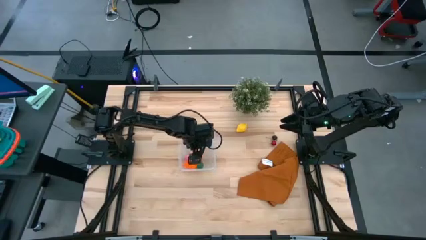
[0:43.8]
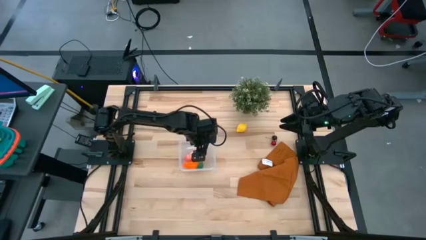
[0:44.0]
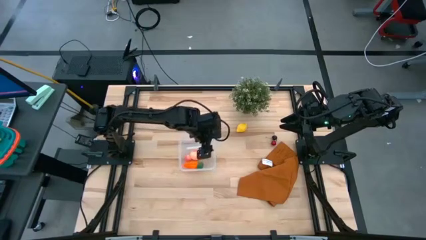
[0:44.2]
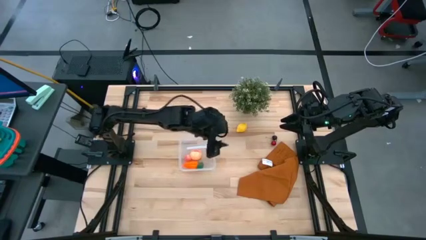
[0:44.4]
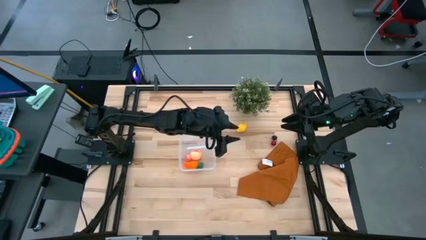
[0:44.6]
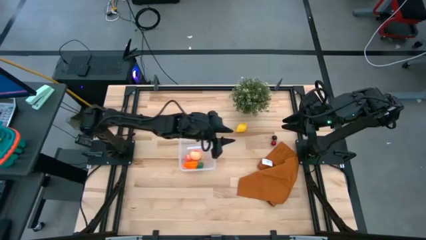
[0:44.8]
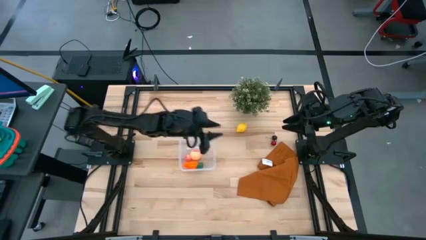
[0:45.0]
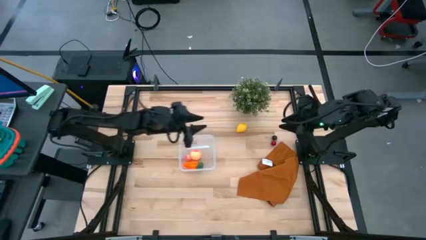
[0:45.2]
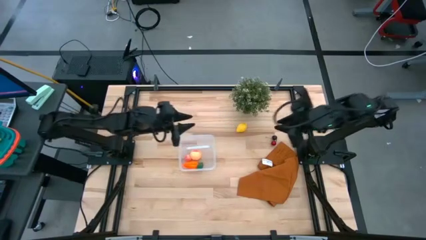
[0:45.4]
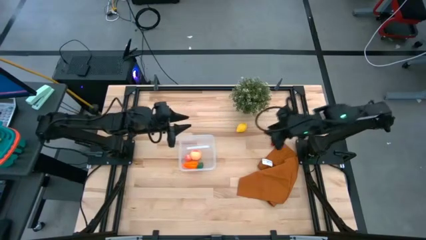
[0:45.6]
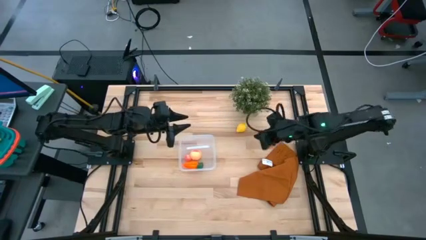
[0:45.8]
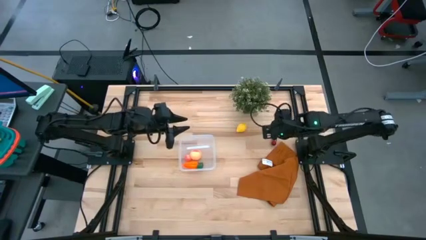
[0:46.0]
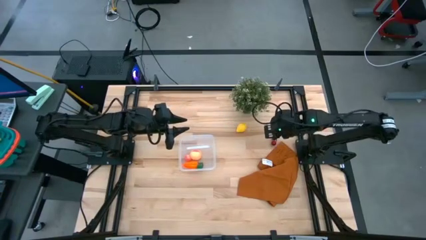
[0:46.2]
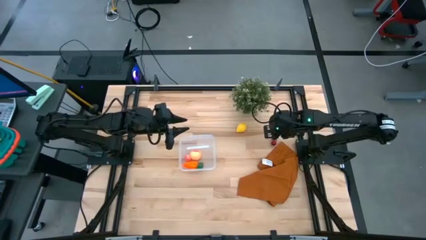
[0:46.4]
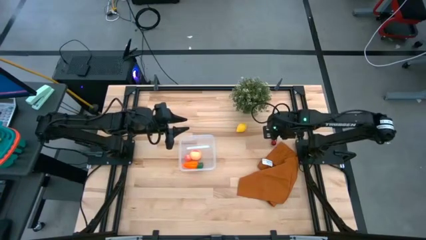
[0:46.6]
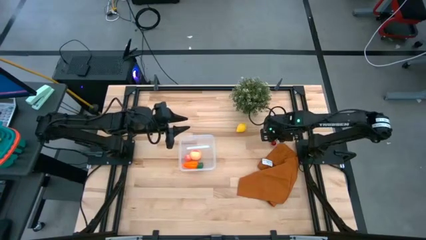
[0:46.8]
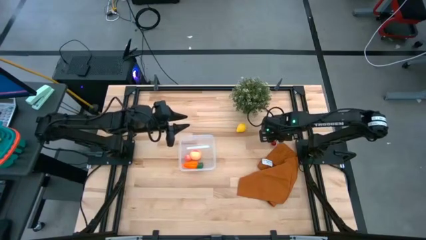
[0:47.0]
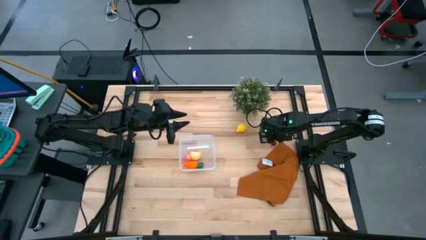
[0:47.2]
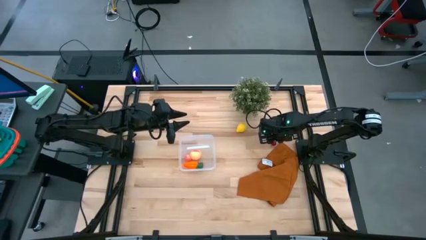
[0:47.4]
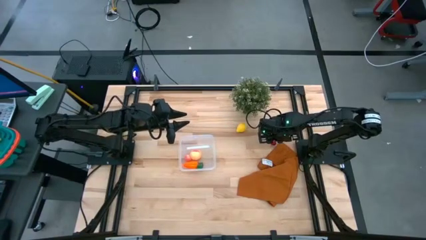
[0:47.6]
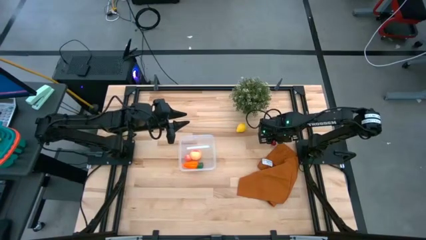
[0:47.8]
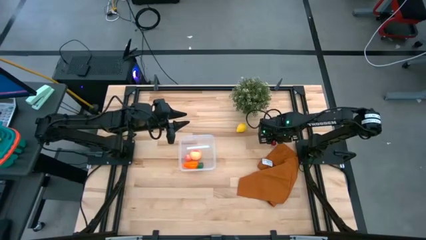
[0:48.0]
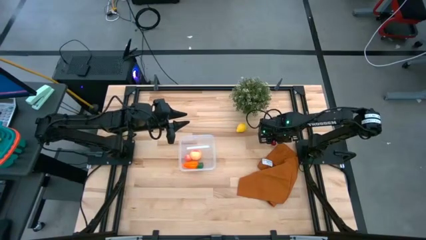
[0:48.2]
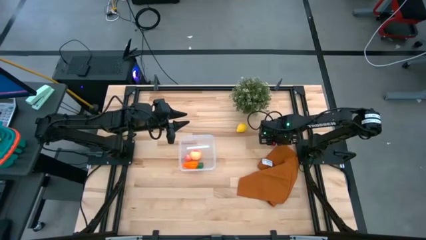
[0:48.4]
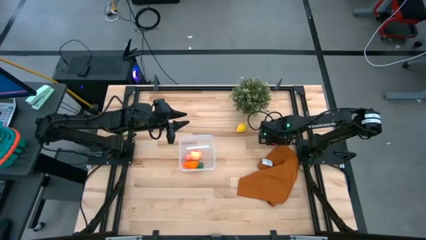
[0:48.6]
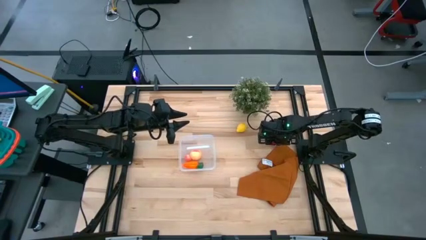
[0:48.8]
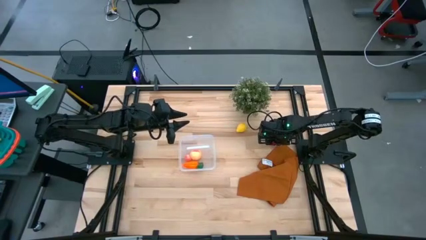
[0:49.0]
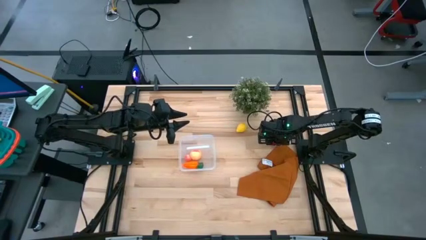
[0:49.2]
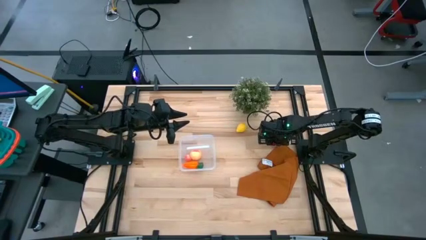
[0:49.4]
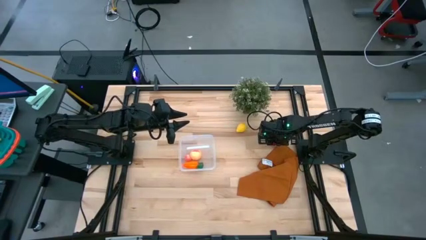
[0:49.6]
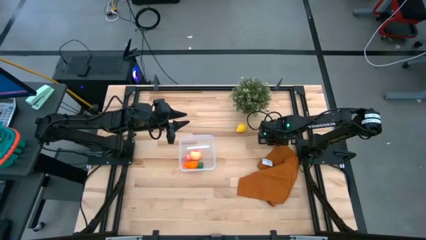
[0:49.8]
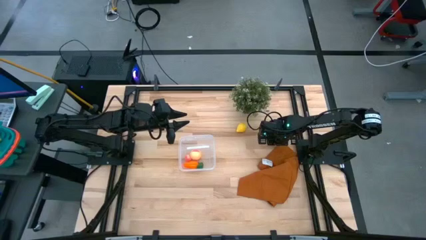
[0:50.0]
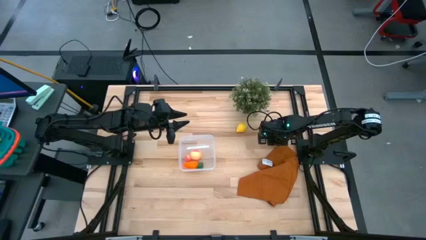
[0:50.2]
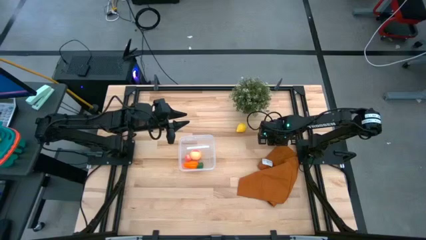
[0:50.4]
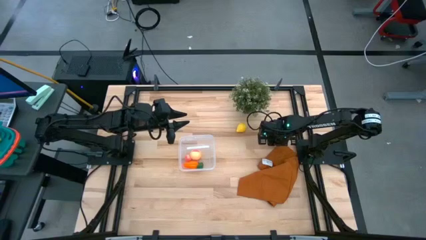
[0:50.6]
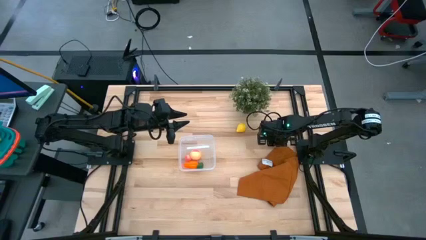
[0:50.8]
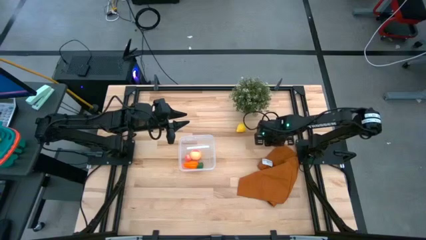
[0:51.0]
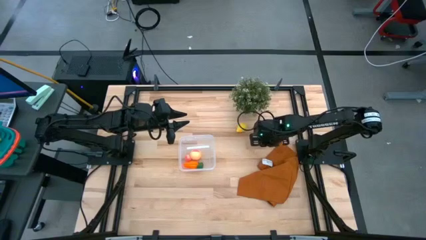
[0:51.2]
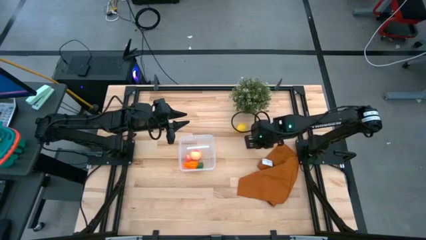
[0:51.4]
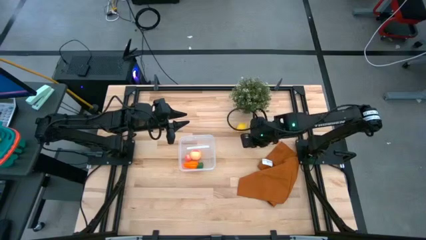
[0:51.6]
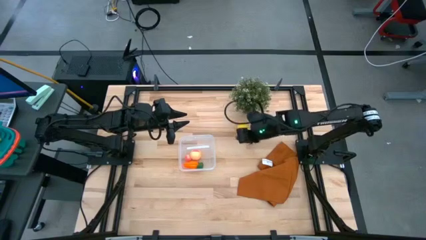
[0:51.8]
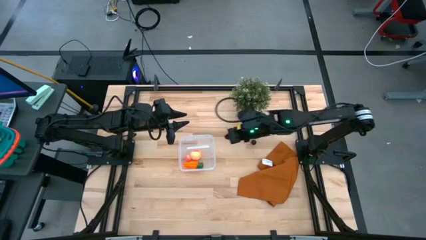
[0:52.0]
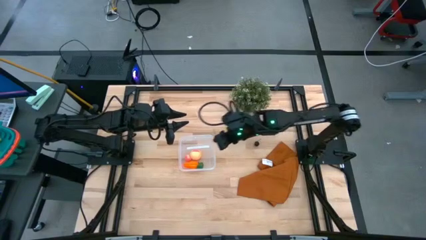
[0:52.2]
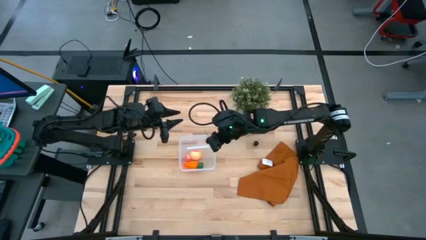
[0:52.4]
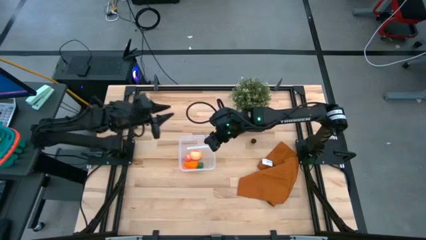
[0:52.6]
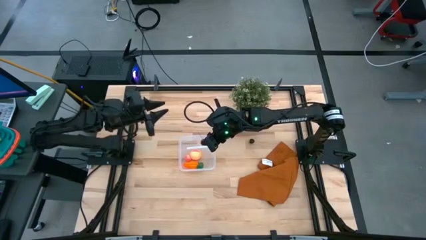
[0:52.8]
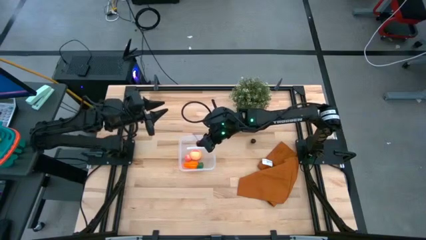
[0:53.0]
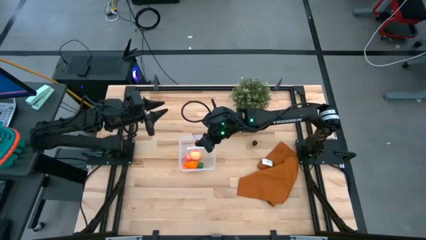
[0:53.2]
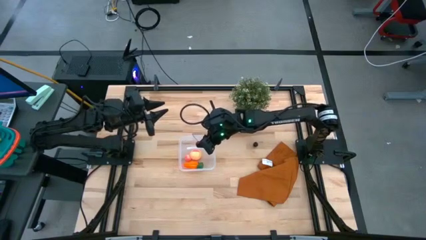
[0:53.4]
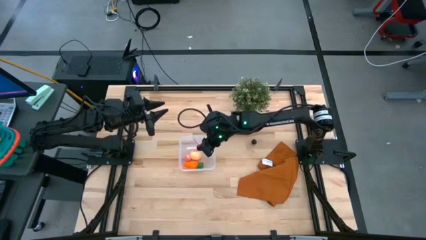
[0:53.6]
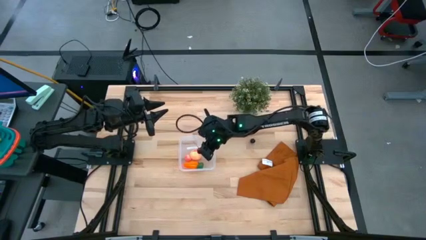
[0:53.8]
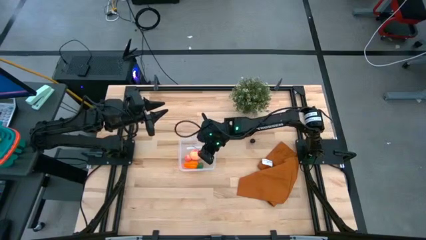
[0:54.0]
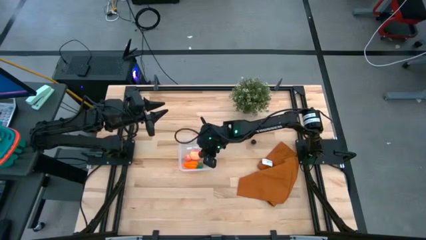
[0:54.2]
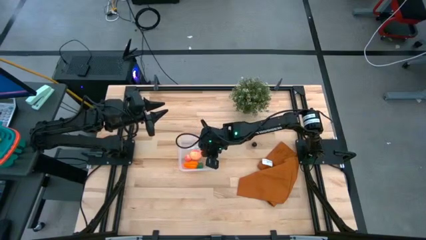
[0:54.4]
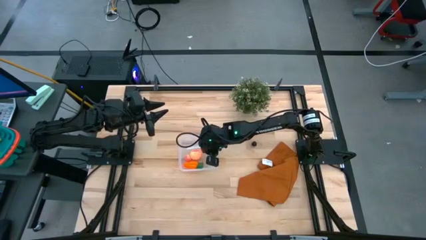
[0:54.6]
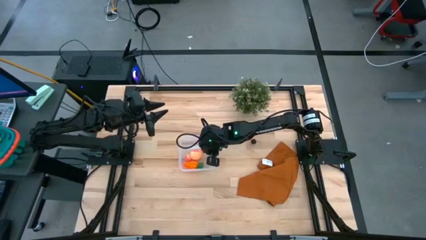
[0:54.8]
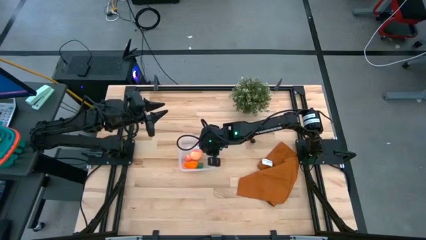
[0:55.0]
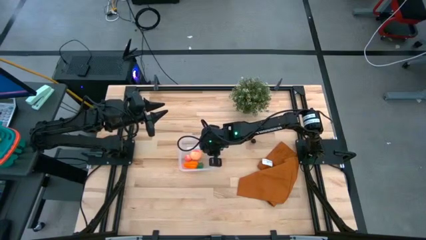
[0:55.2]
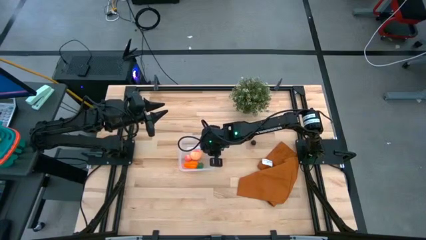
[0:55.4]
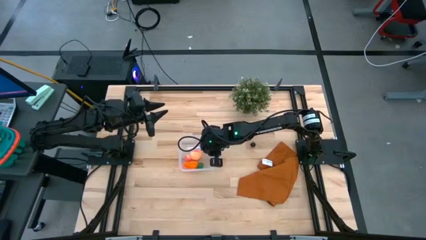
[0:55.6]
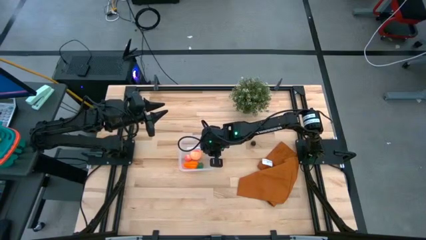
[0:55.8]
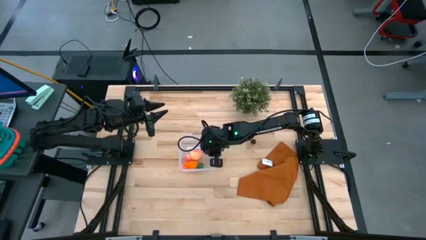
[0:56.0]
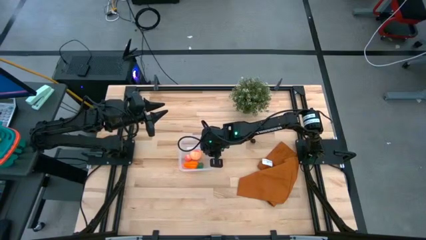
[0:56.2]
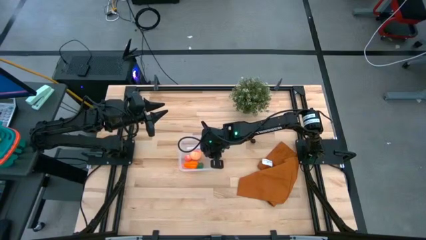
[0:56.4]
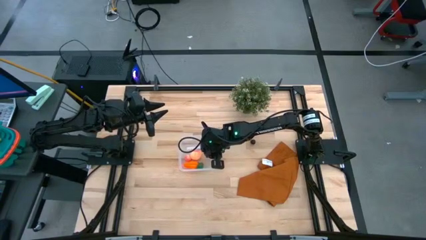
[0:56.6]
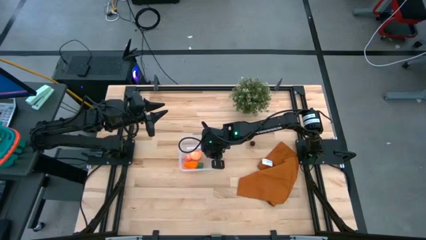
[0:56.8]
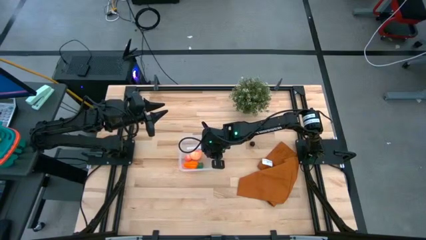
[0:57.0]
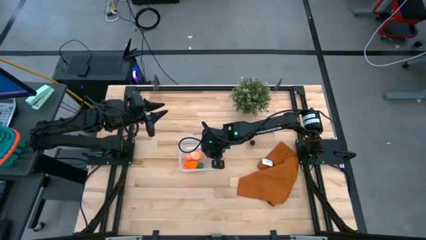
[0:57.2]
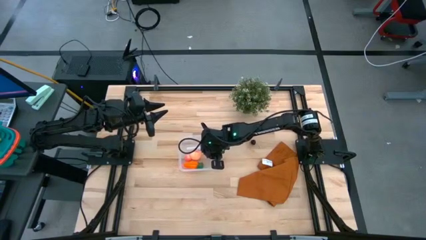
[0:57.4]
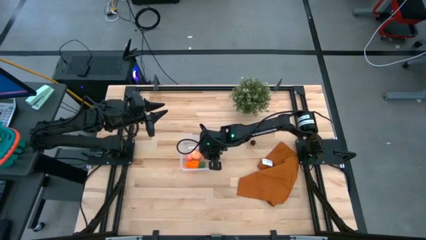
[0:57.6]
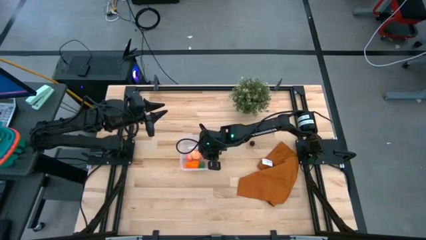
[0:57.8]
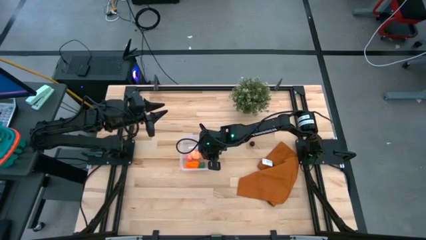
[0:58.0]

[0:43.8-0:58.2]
Task: Pick and placing Produce into tupperware
Put the red cherry into the transparent bin
